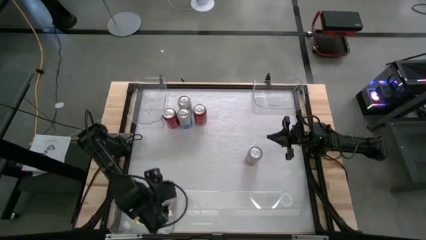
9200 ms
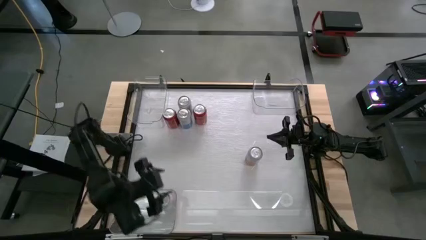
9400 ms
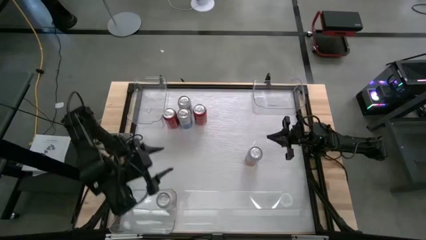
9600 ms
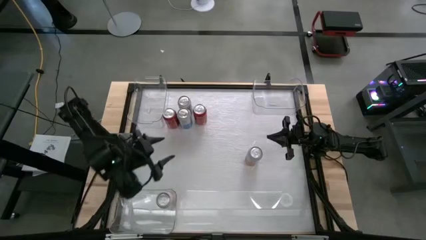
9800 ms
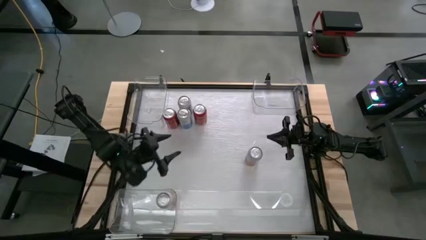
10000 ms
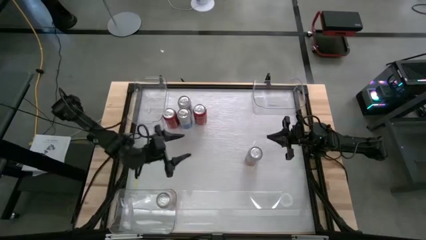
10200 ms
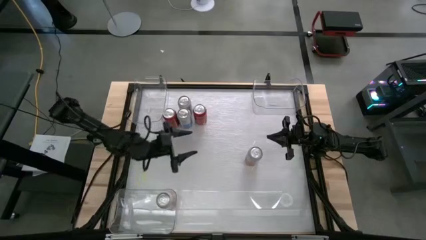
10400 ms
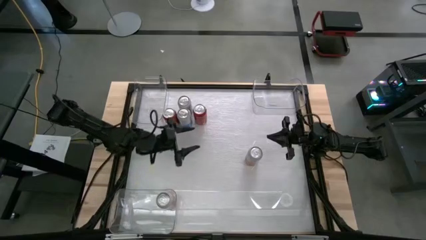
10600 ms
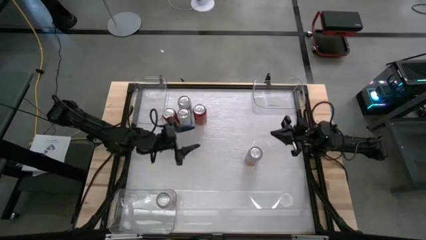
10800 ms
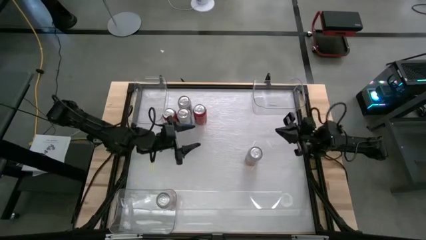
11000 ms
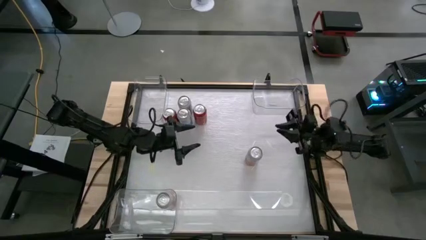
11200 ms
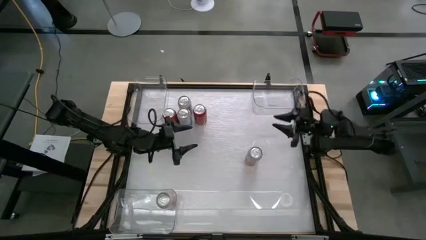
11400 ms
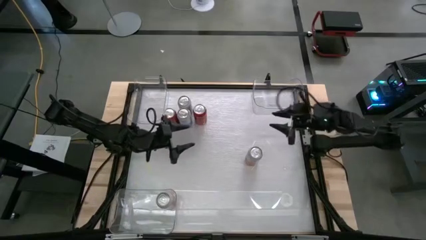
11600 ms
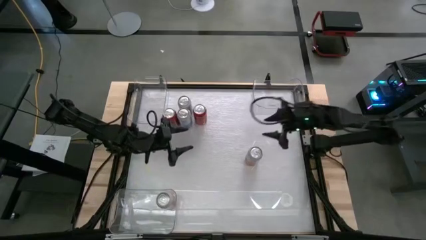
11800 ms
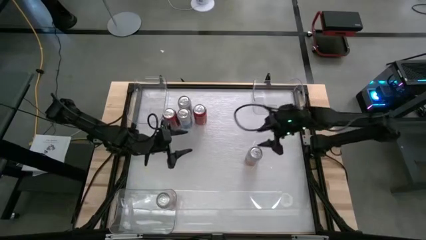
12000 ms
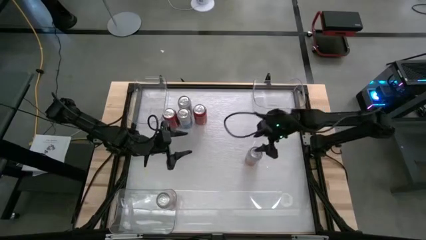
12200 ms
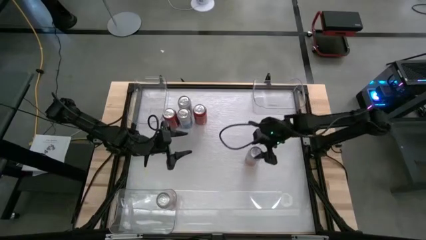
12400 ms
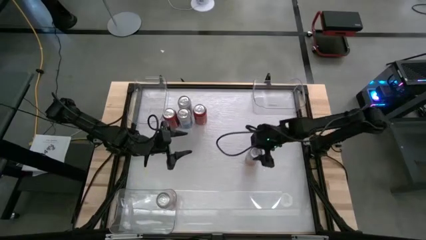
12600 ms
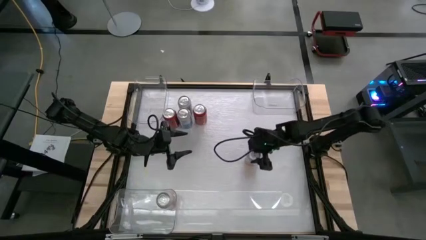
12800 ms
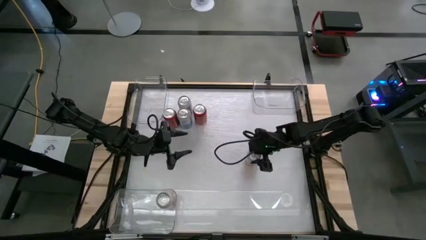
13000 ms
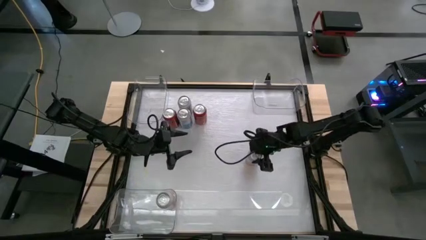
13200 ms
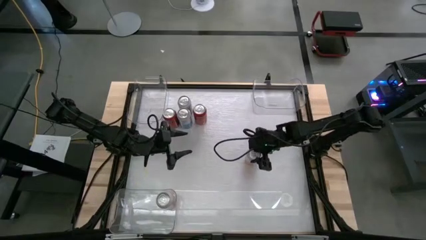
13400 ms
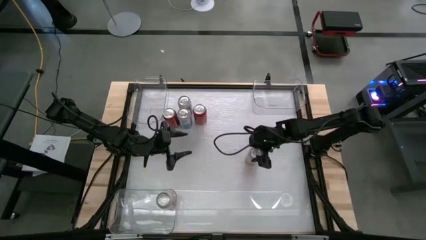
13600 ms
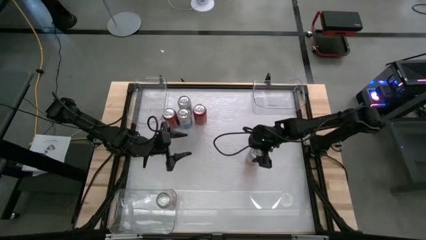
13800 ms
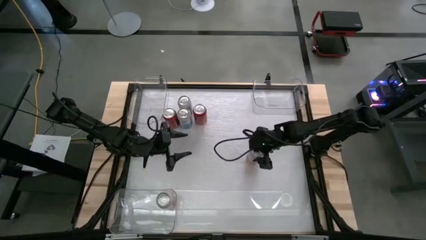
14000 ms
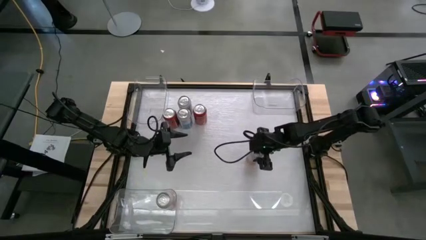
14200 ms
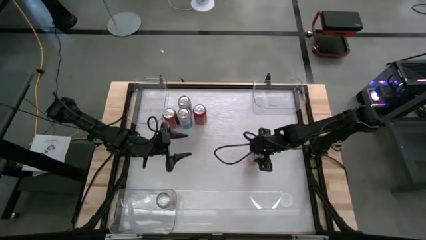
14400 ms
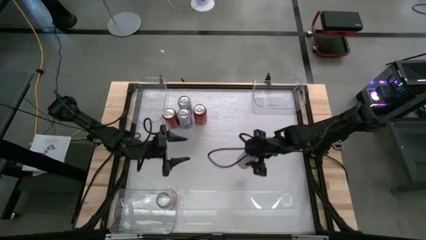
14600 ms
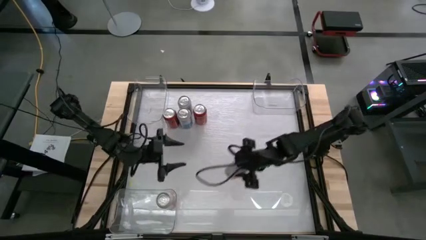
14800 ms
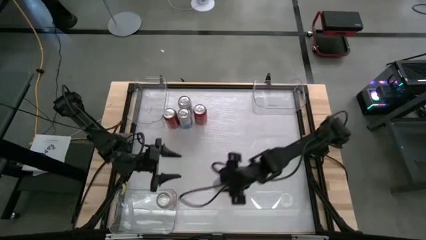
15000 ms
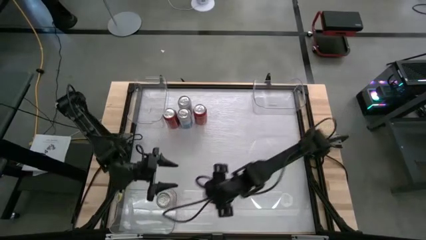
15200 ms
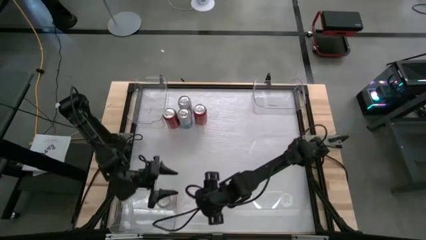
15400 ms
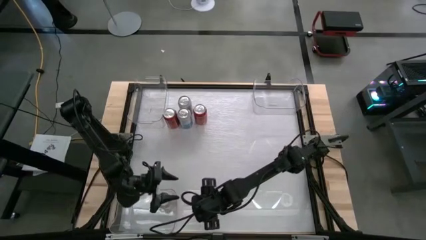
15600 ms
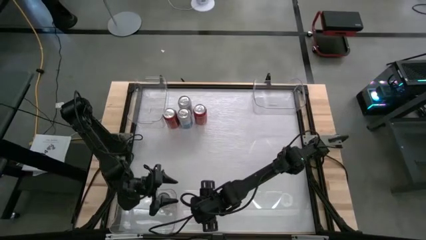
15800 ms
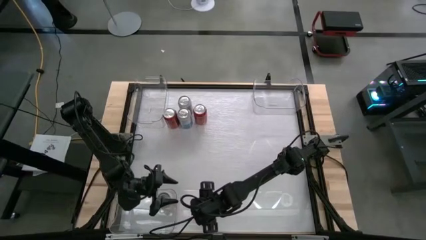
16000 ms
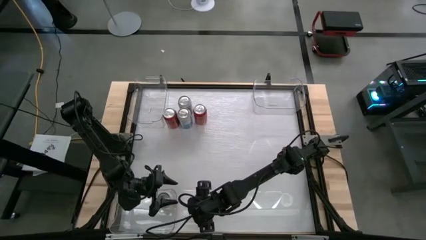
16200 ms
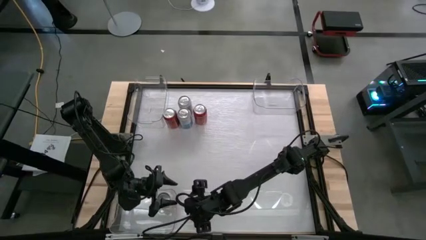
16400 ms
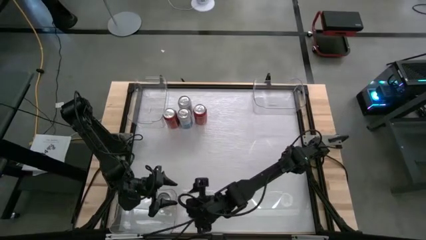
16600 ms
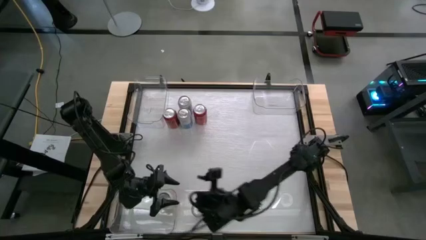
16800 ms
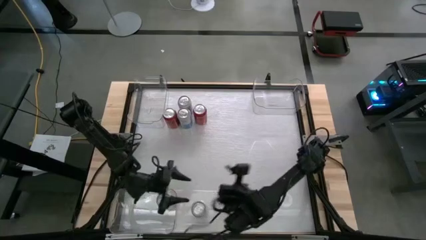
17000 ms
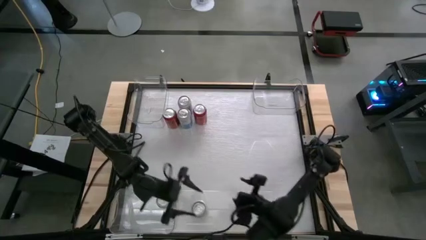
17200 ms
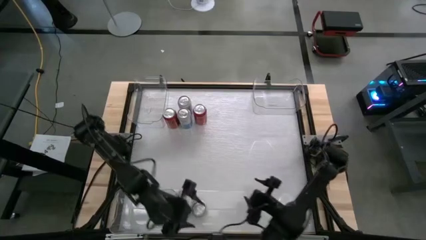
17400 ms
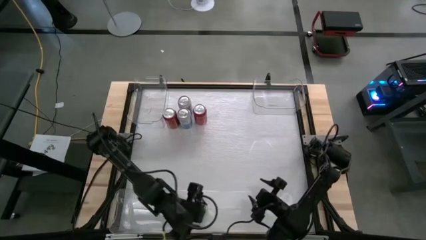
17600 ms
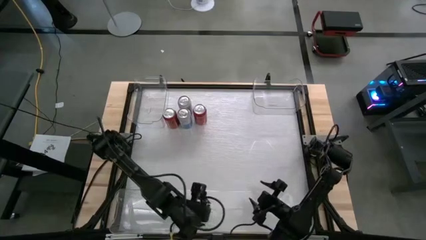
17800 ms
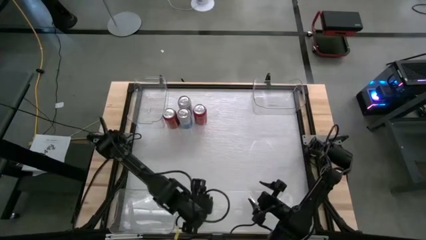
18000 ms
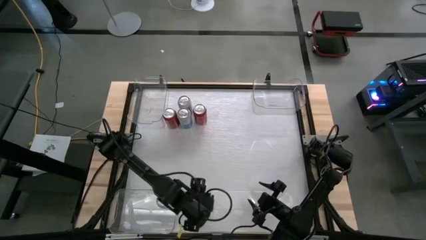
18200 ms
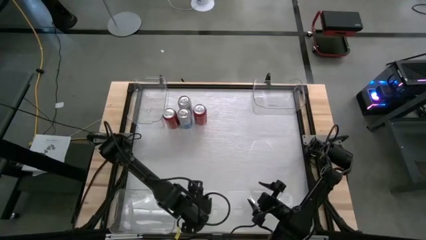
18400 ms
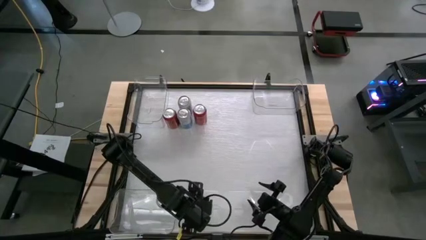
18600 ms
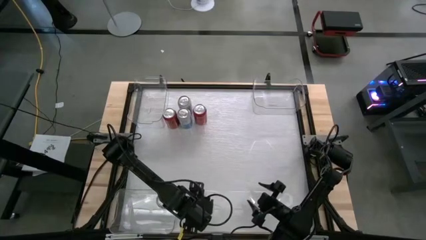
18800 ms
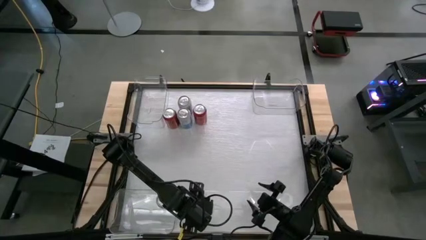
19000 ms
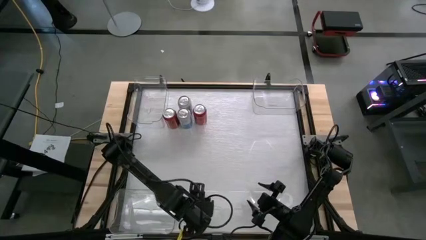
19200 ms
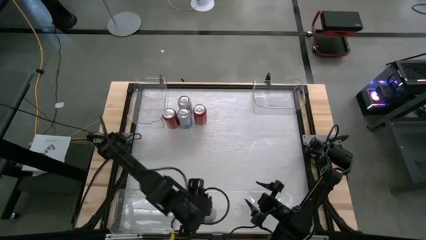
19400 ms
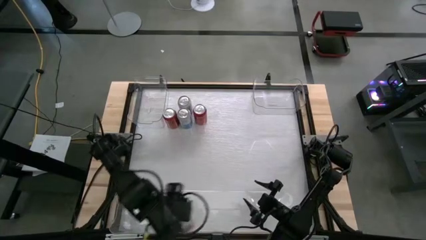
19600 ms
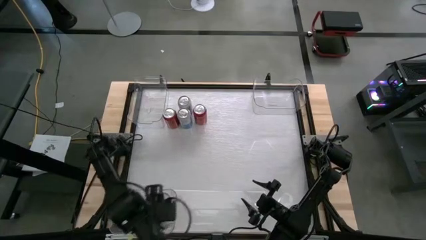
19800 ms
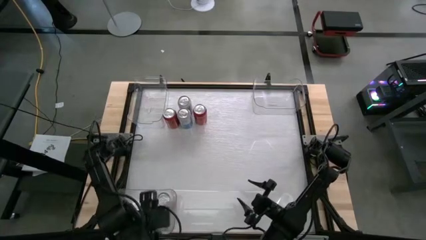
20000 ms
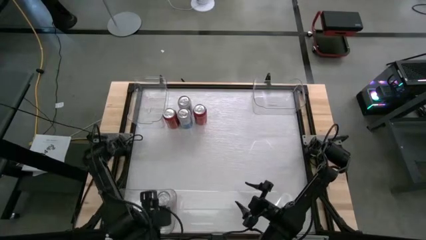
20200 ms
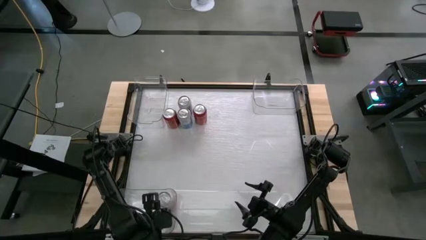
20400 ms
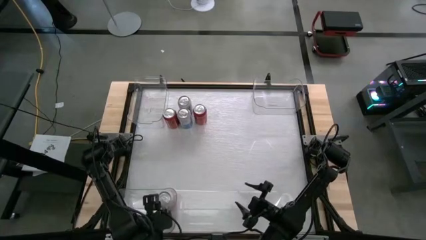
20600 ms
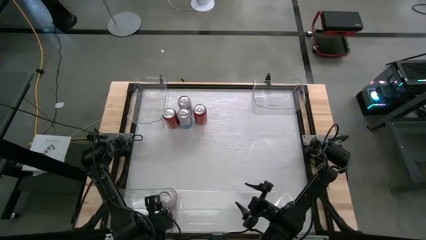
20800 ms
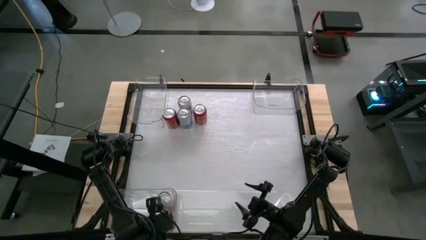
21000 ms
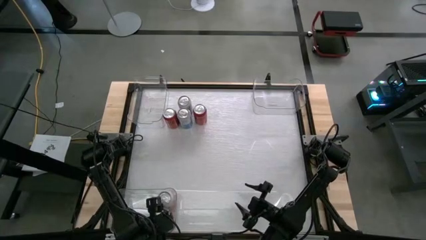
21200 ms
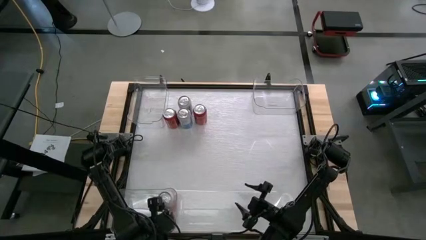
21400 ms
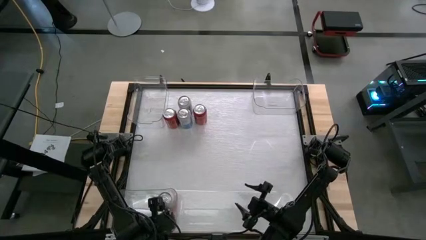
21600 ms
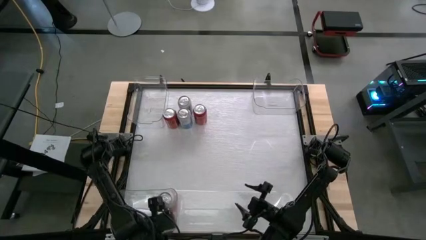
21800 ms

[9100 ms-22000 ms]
Task: Sort soda cans
Put the right orange and white soda can into the bottom transparent bin
